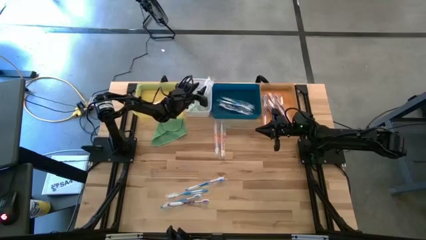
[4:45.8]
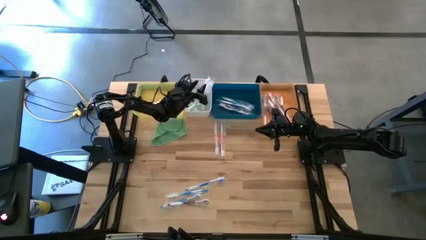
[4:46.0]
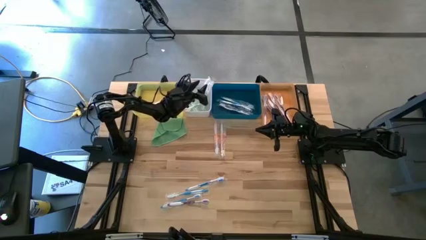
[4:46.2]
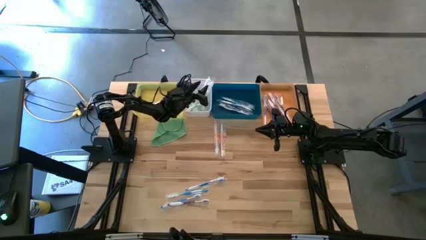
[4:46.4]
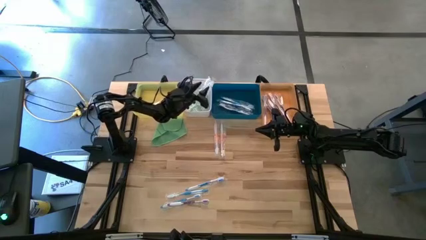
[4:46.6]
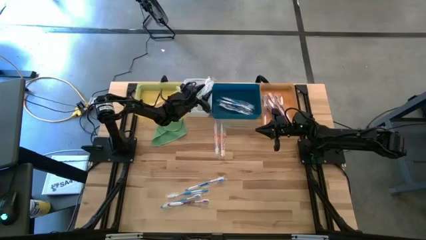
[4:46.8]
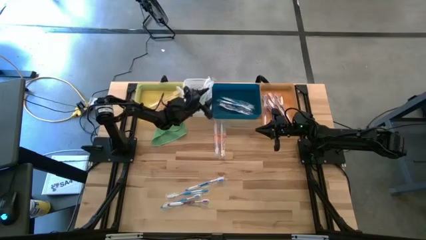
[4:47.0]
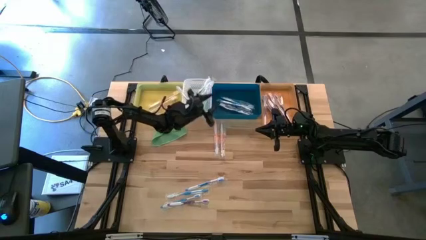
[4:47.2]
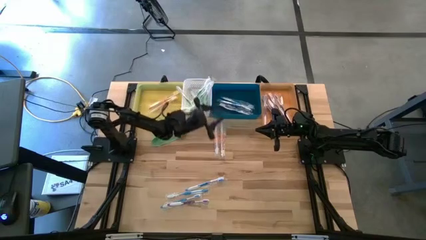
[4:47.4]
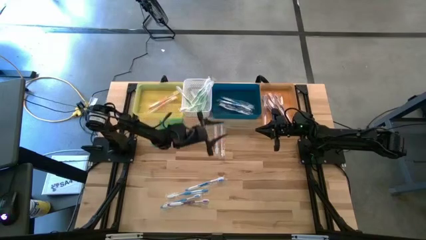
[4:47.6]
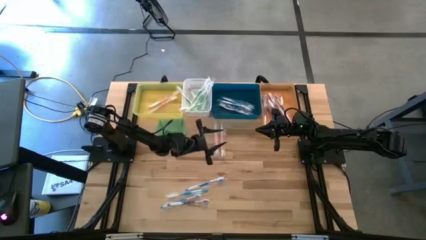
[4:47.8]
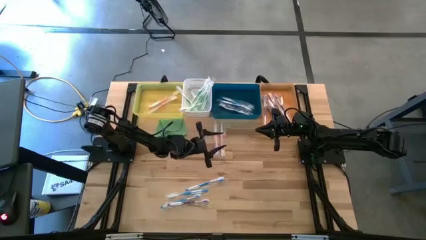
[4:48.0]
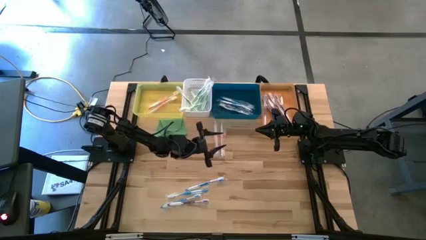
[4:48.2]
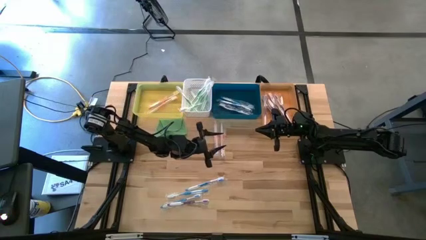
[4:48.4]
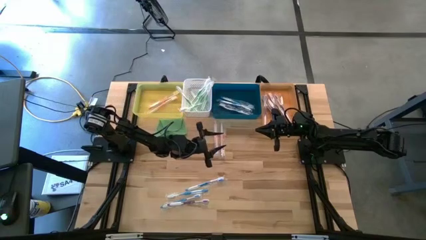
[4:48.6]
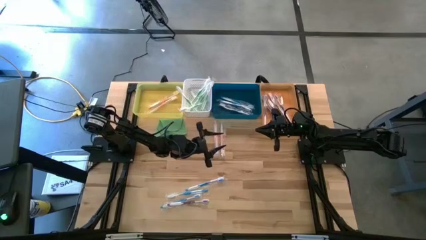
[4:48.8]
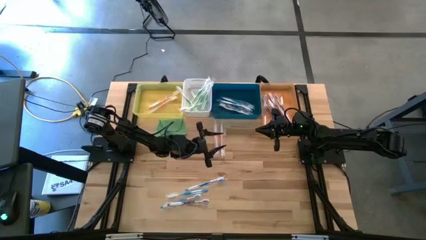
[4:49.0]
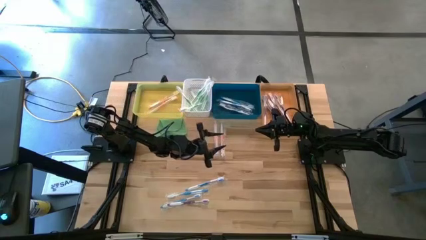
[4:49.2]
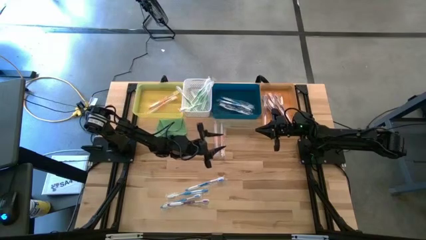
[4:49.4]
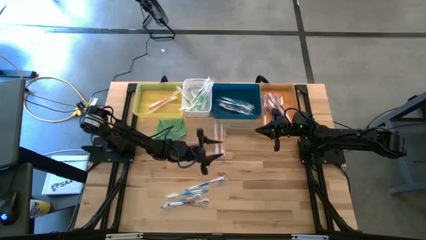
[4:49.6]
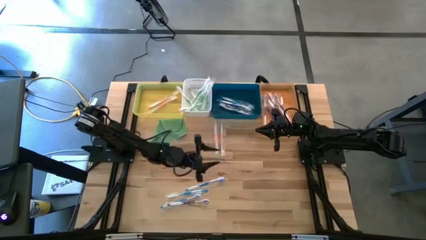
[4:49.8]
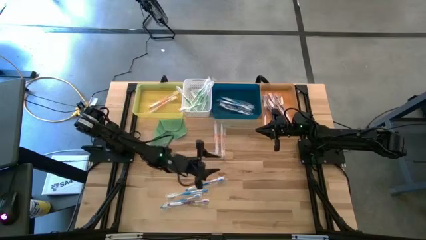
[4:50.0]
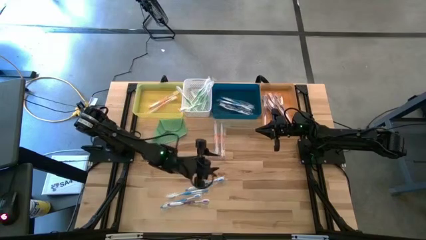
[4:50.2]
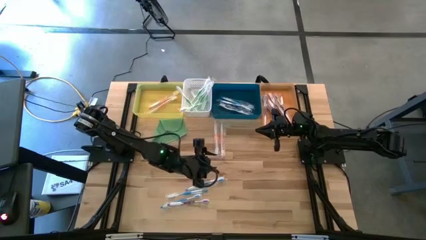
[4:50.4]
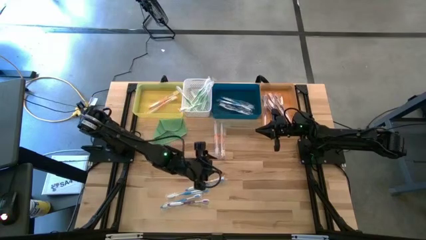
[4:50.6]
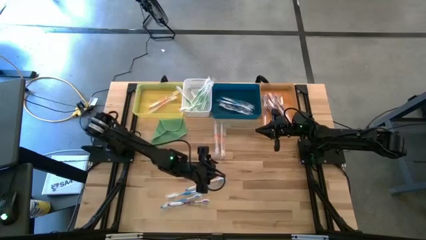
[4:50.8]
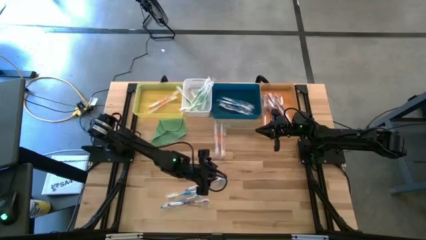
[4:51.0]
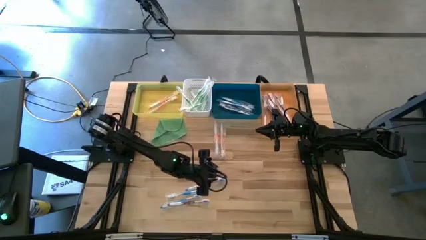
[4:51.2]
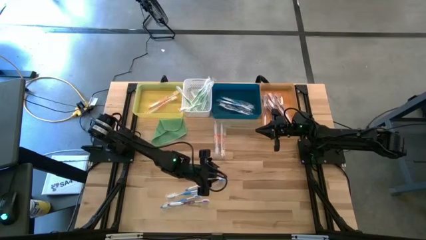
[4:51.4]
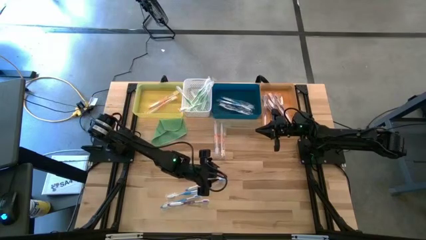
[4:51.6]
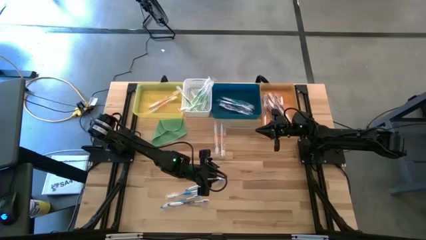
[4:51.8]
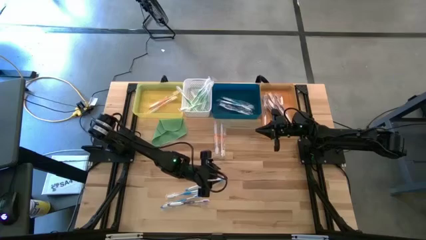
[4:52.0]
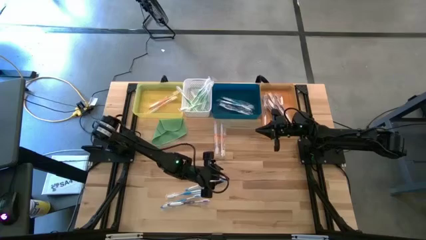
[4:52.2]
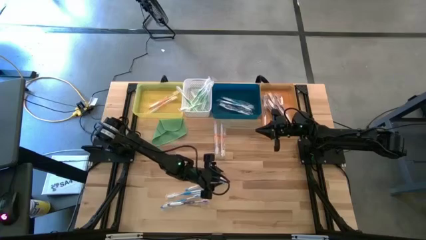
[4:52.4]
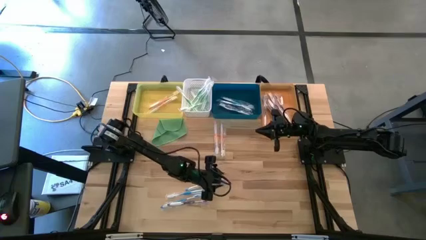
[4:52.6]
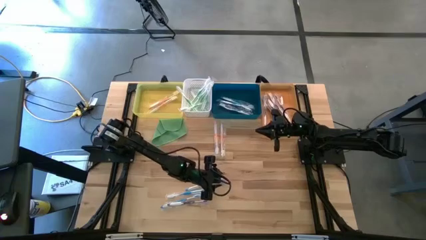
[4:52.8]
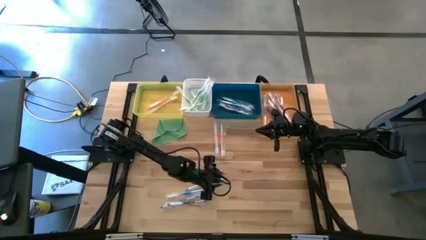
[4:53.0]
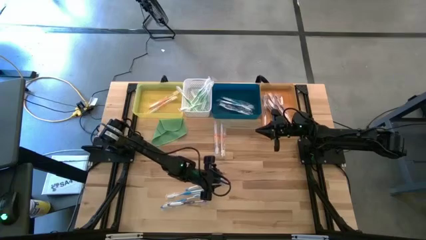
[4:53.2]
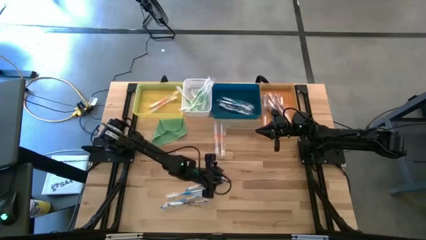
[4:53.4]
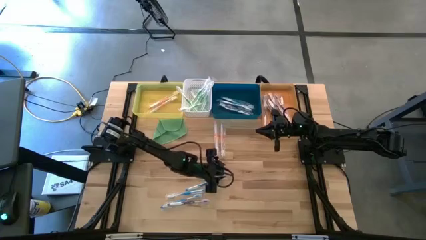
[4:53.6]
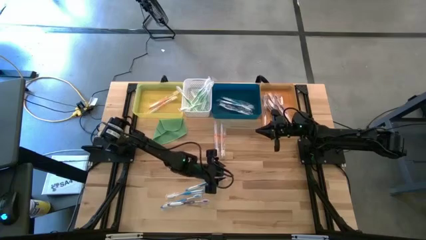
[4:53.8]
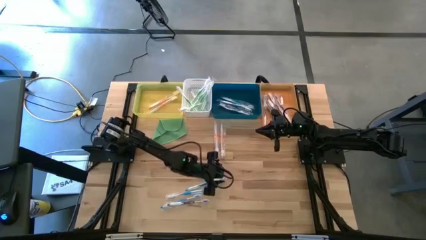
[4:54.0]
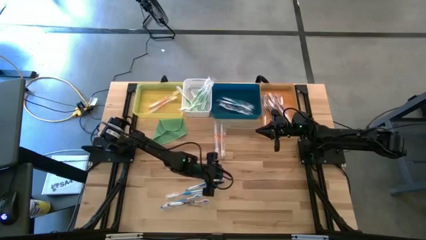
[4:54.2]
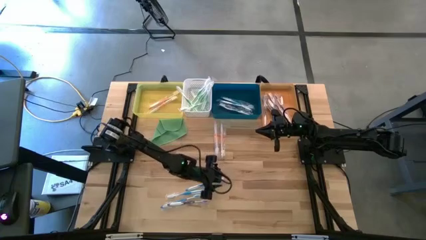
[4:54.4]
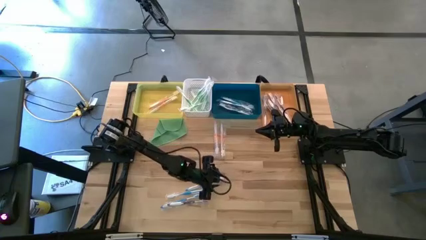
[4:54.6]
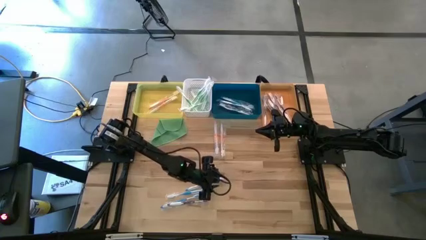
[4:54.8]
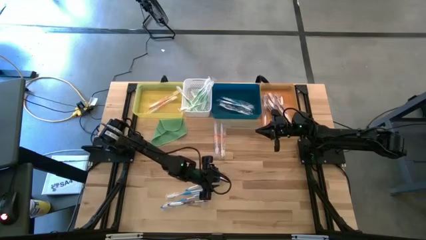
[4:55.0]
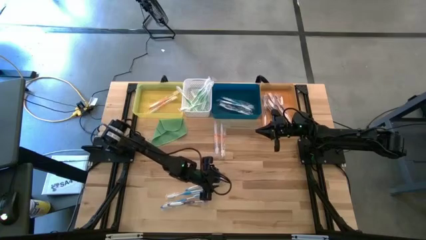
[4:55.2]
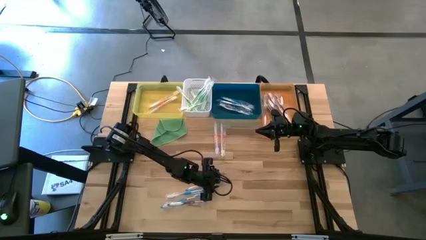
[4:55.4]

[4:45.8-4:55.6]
Task: Pick & Place Toothbrushes
Put the blue toothbrush into the blue bin

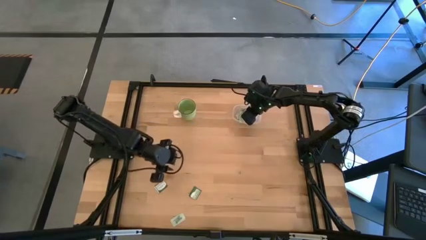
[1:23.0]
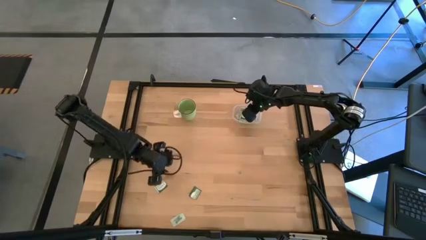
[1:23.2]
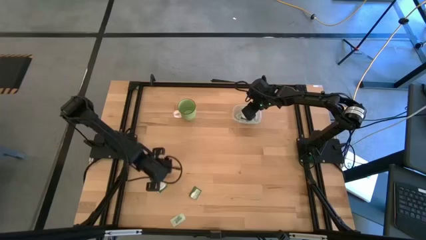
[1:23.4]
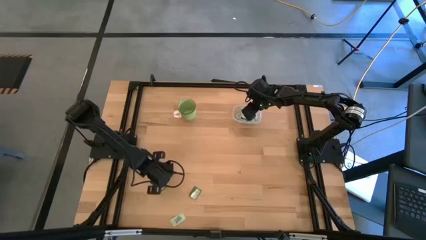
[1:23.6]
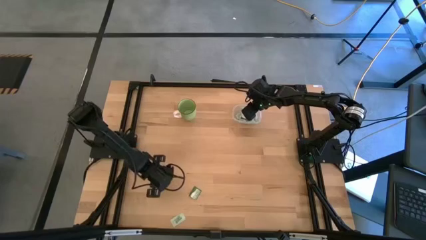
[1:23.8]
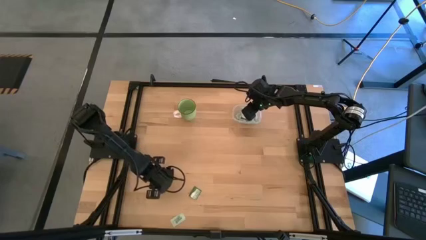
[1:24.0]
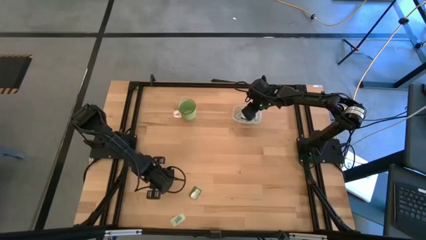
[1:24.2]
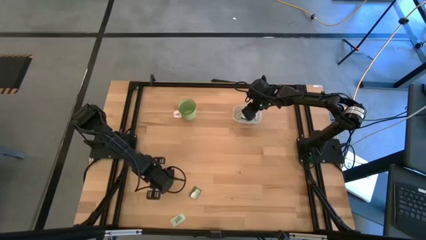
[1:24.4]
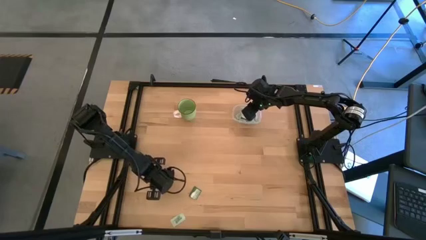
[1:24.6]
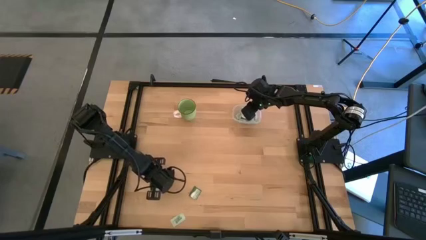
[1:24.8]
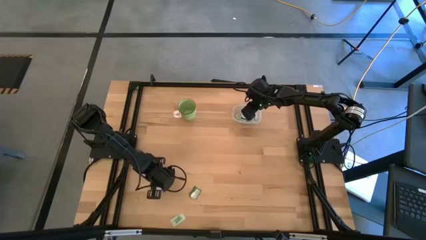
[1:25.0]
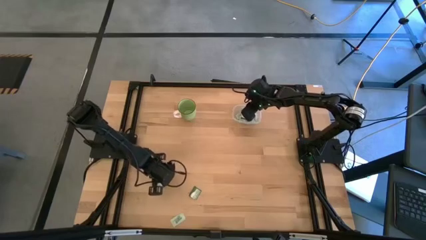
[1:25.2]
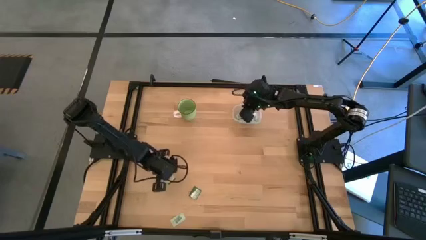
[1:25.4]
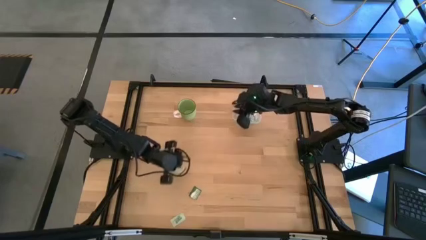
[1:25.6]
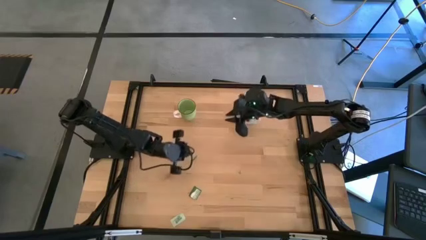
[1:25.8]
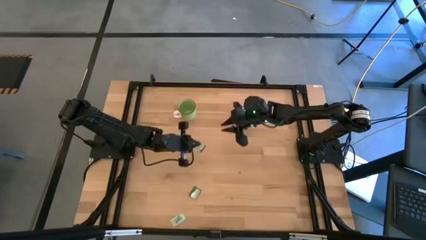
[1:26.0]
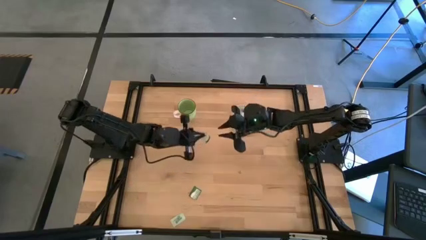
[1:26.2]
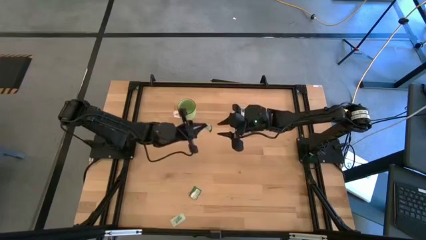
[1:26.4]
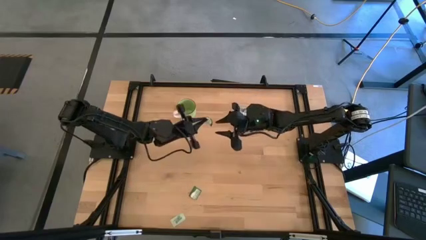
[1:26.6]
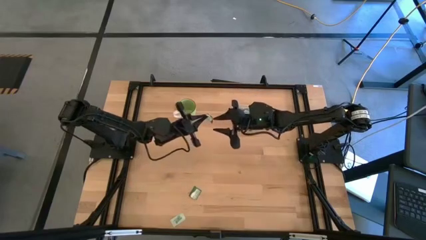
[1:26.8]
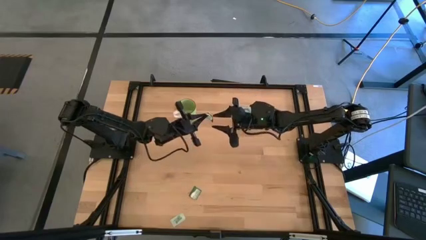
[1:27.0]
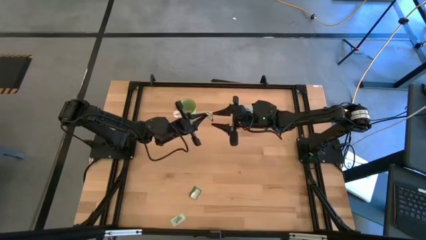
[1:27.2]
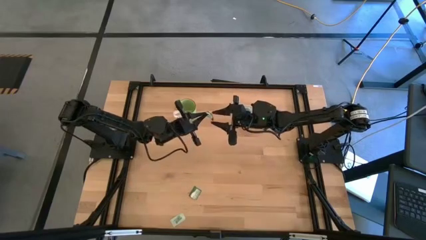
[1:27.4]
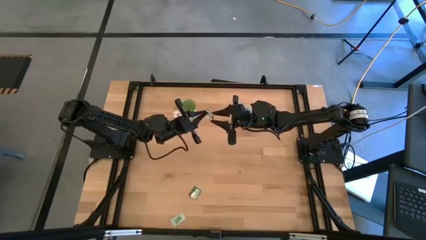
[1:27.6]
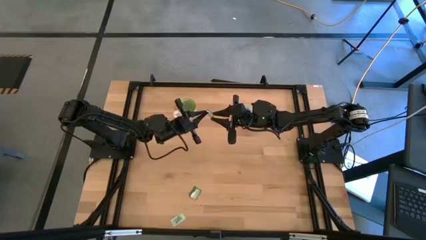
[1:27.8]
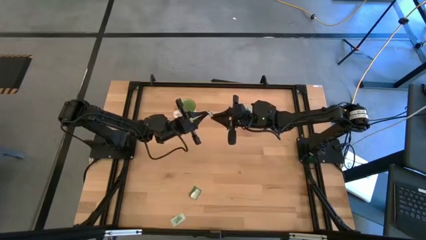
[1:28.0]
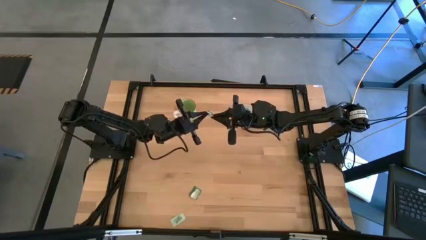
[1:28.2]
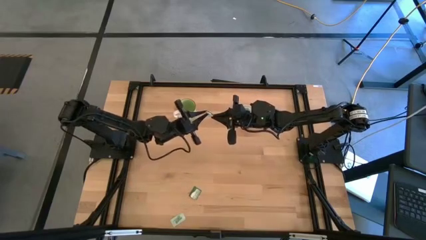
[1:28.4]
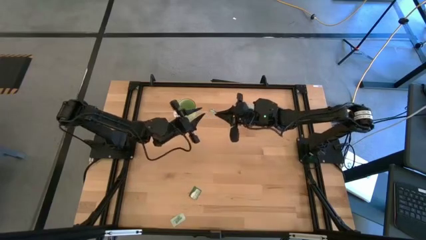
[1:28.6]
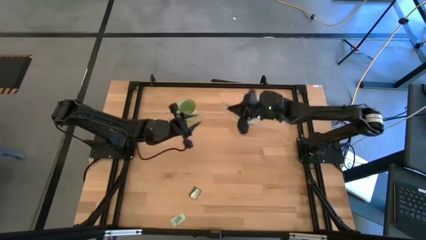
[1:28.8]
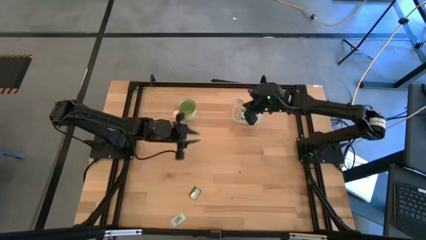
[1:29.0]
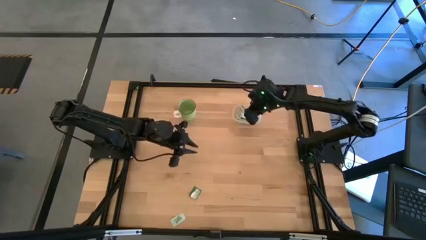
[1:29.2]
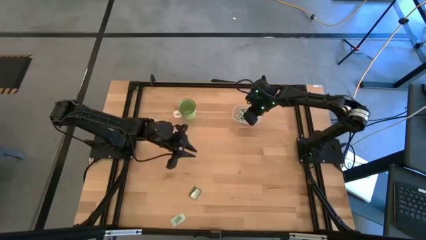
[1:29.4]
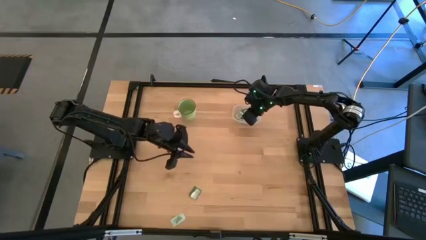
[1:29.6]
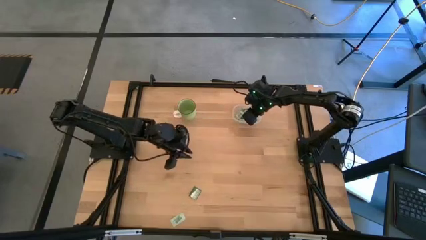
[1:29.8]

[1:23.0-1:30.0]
Task: Pick and place items into bin
Put the green truvia packet into the transparent bin
